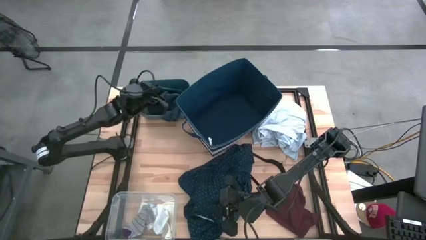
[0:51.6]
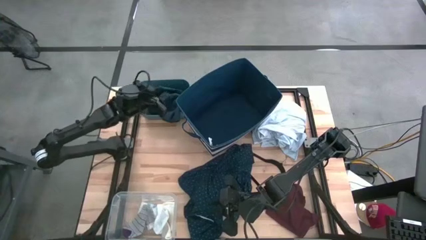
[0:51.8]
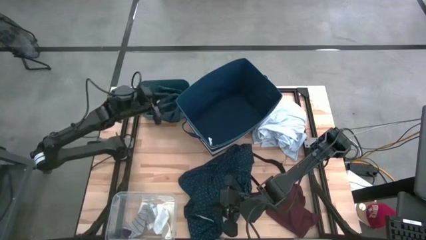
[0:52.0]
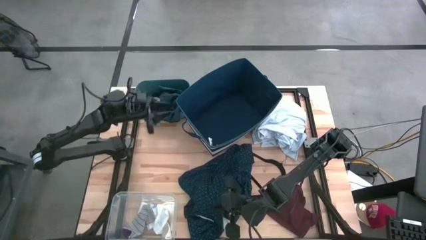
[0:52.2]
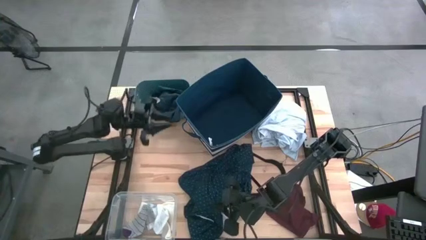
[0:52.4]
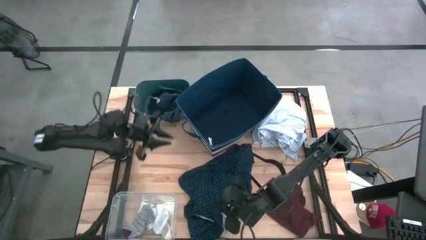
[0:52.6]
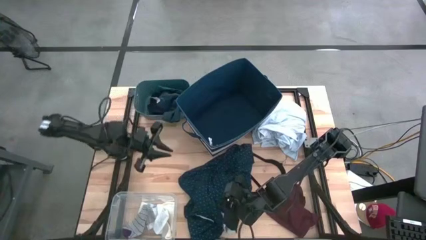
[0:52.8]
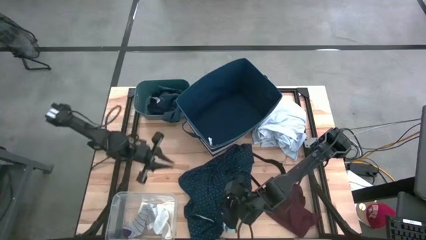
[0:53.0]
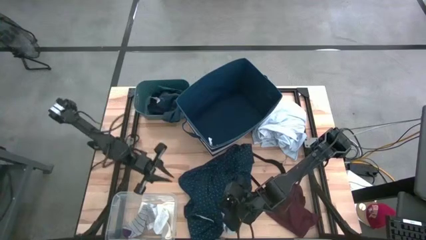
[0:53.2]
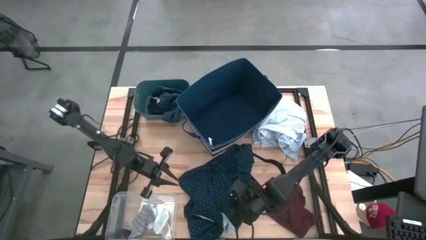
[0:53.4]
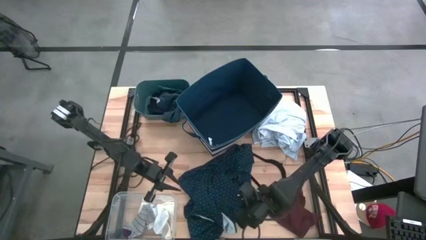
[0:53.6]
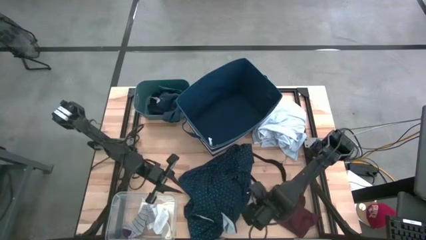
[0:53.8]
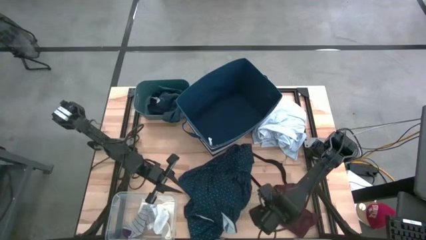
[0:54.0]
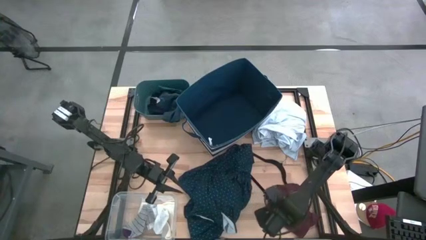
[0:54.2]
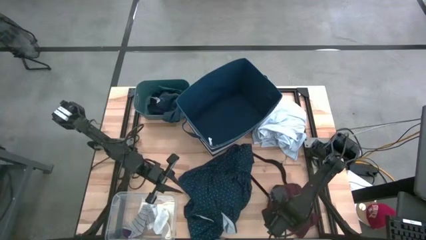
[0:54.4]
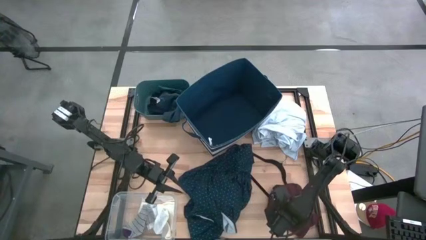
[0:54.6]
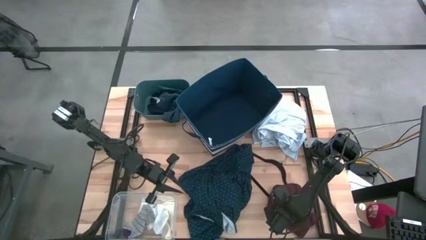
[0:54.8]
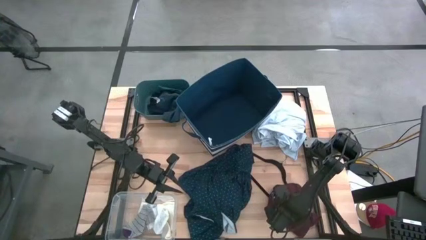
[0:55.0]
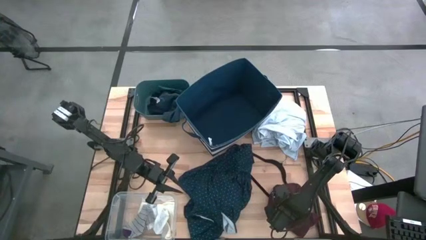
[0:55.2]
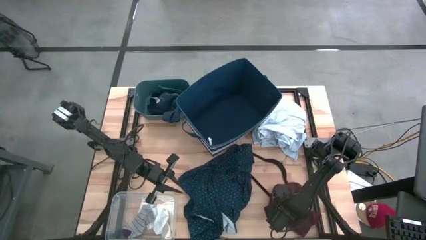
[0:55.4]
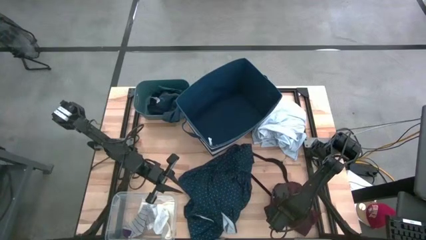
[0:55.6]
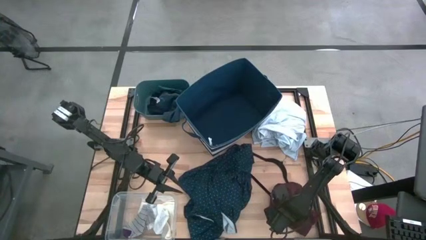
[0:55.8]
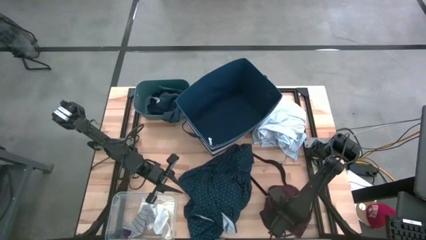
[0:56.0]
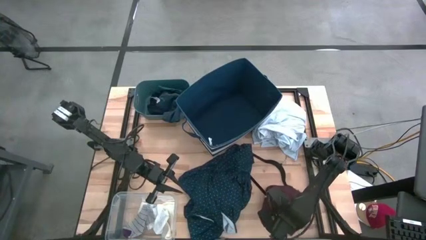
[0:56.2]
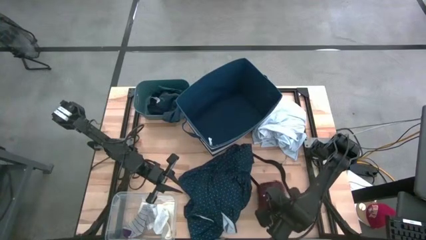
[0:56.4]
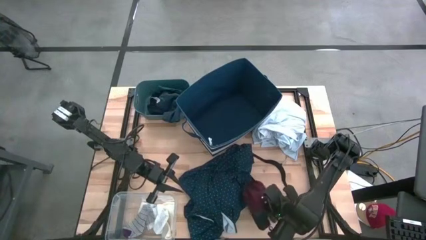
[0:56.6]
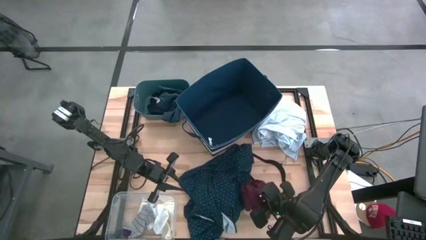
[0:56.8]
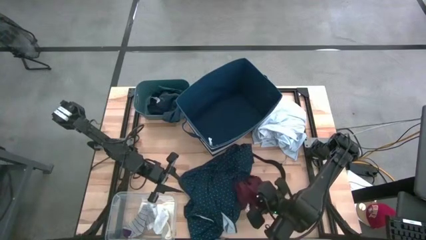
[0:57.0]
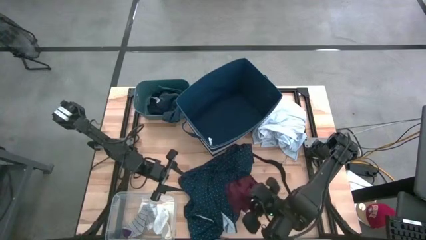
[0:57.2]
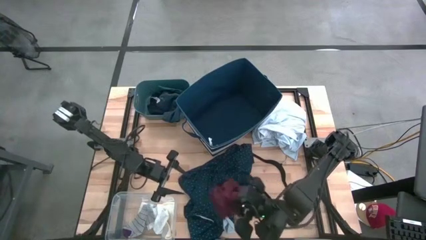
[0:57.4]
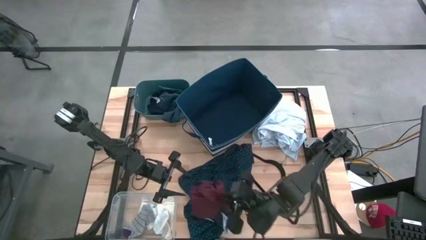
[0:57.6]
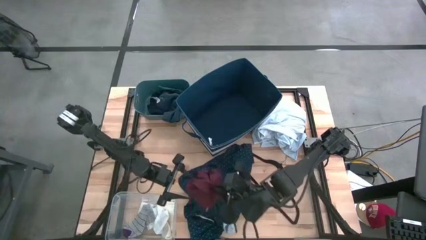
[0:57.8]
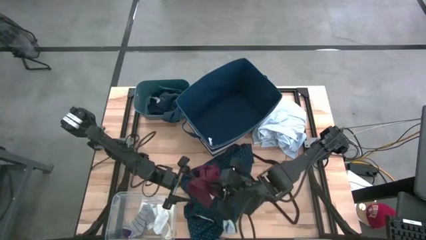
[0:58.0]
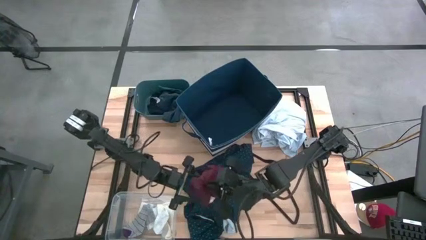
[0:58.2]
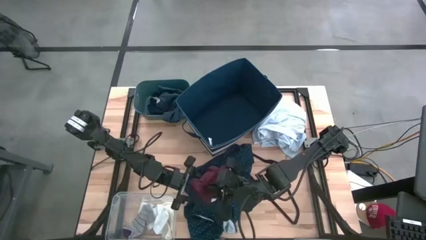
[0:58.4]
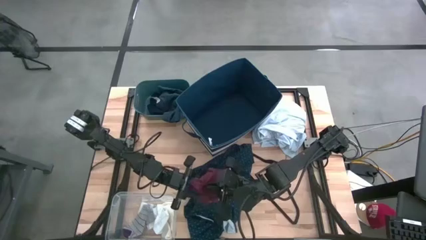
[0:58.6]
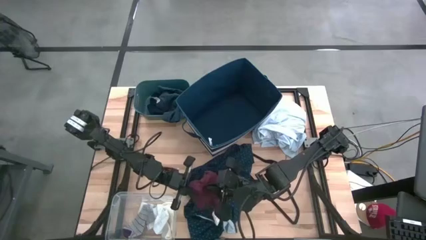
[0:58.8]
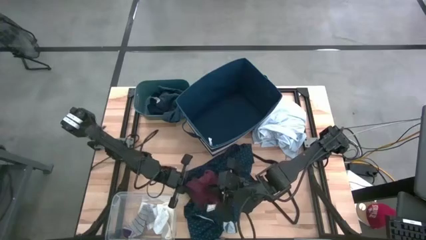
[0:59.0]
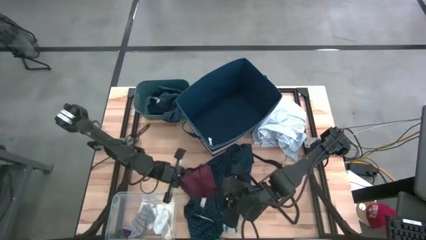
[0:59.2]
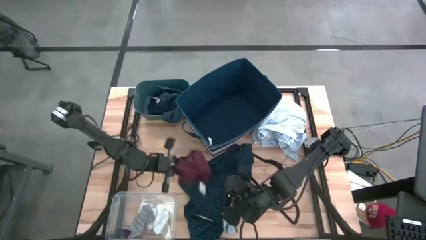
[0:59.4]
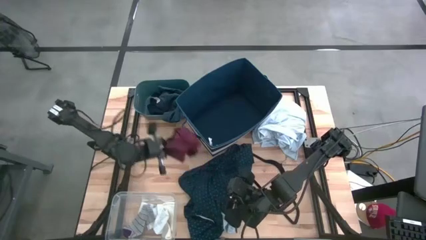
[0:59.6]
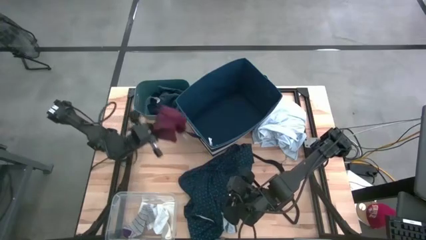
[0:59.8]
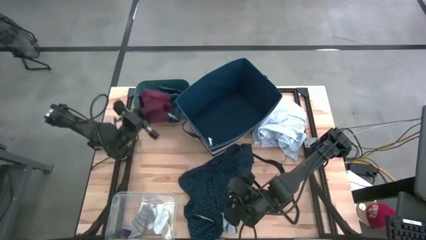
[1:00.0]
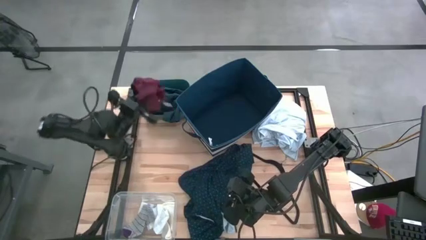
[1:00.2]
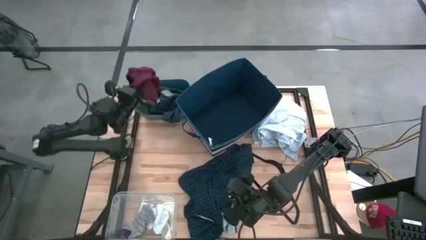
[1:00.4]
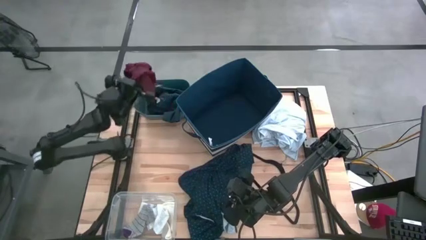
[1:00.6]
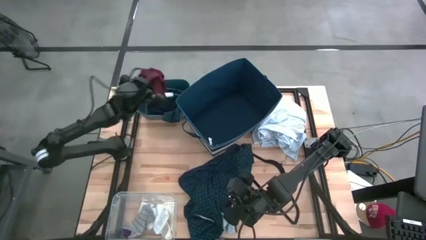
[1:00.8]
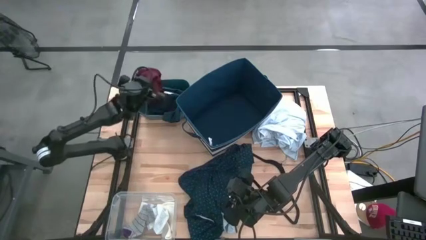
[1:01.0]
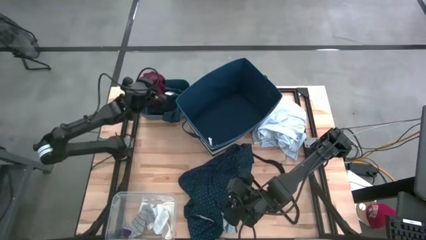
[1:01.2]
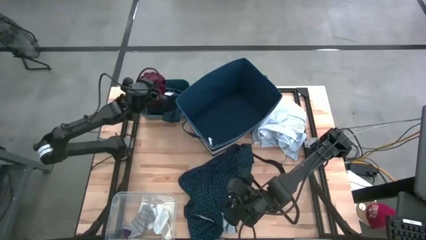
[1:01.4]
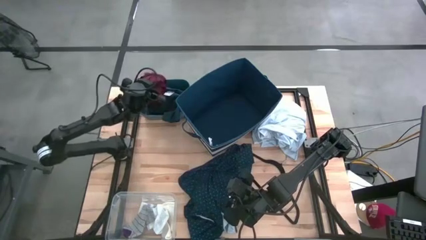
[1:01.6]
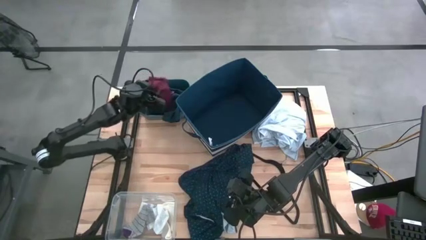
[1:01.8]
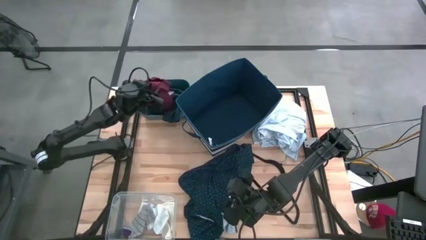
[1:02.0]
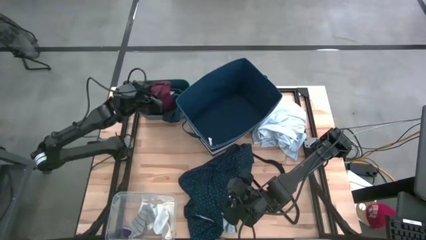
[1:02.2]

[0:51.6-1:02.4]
Task: Pick & Place Cloths
Put the red underwear into the green bin
